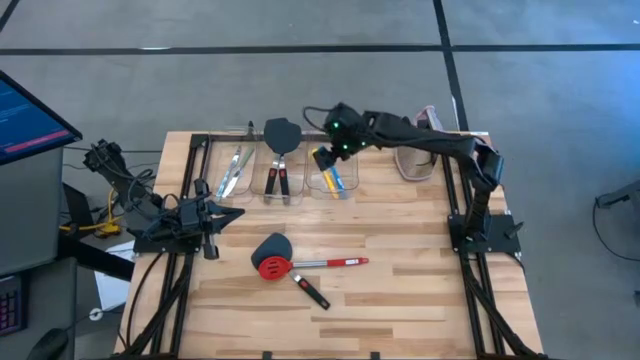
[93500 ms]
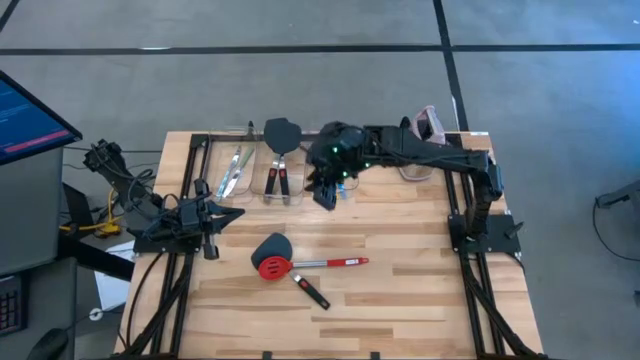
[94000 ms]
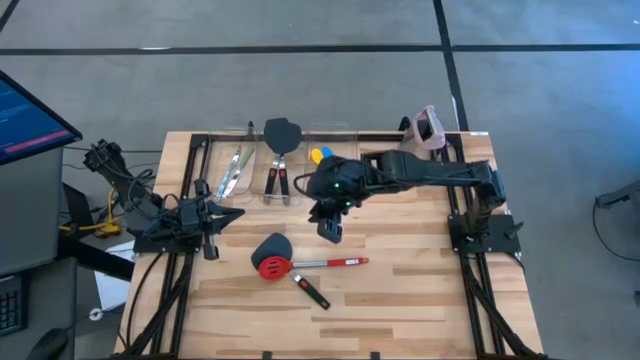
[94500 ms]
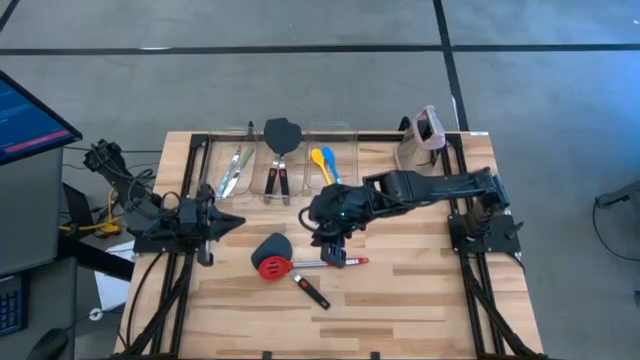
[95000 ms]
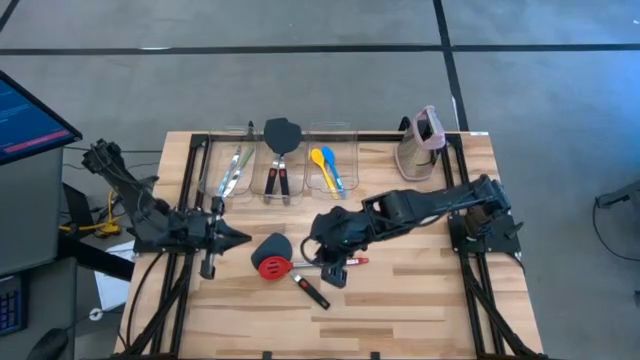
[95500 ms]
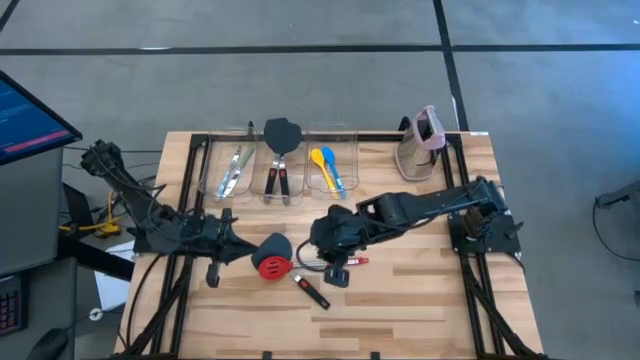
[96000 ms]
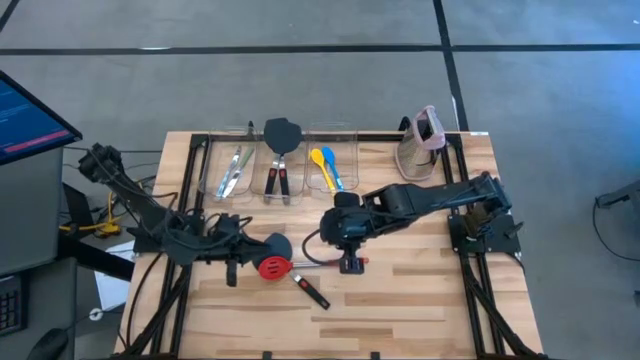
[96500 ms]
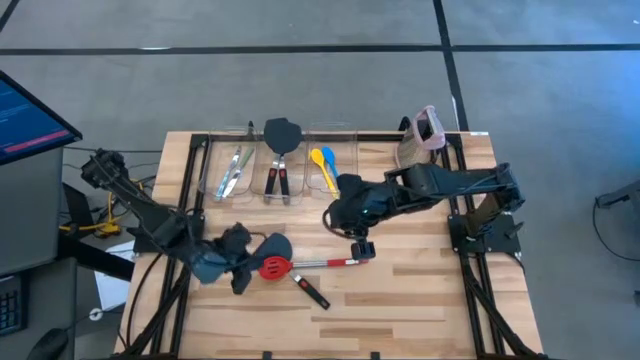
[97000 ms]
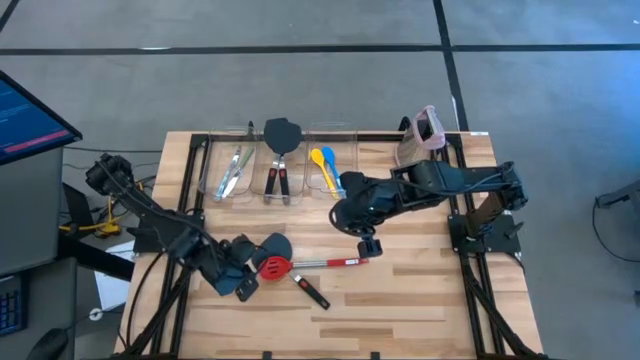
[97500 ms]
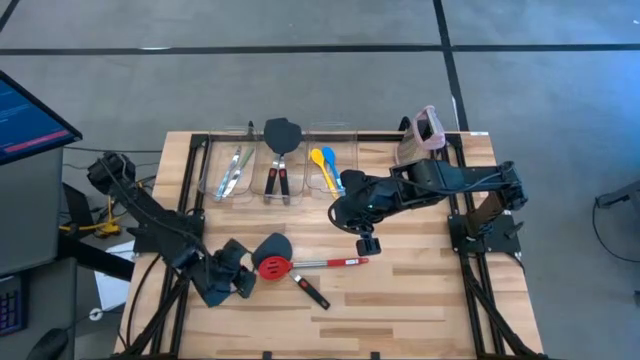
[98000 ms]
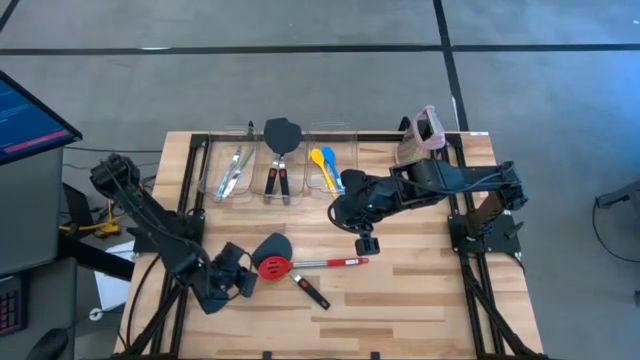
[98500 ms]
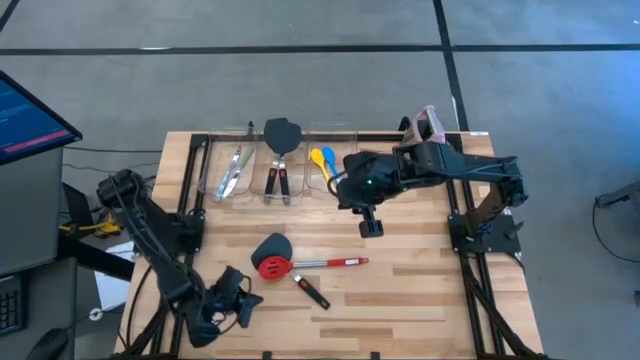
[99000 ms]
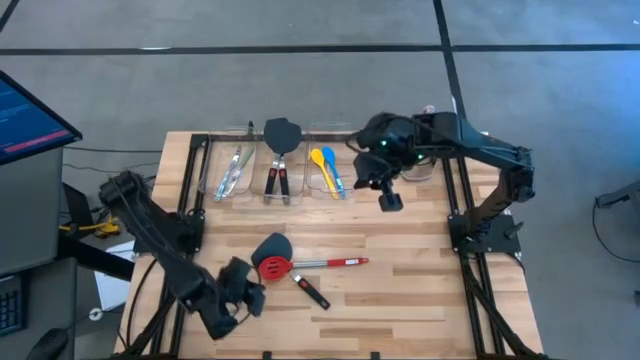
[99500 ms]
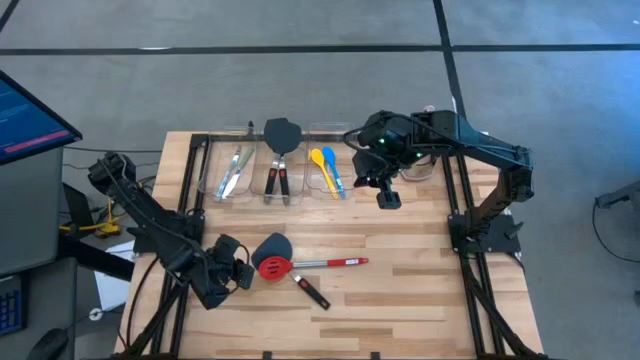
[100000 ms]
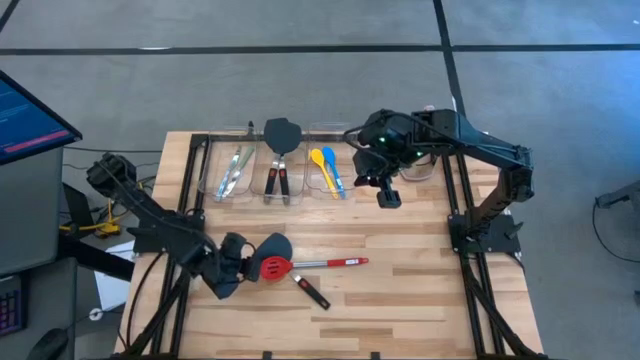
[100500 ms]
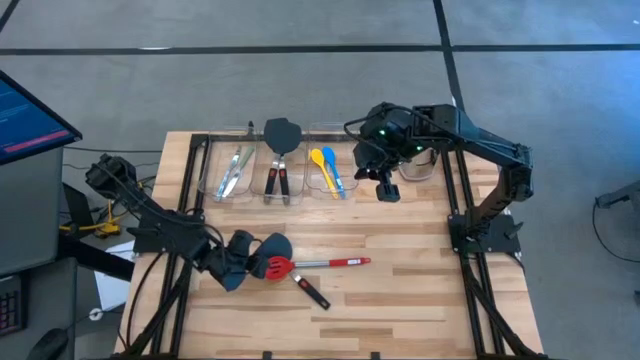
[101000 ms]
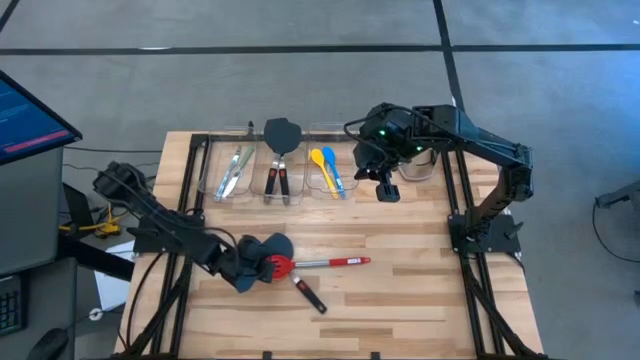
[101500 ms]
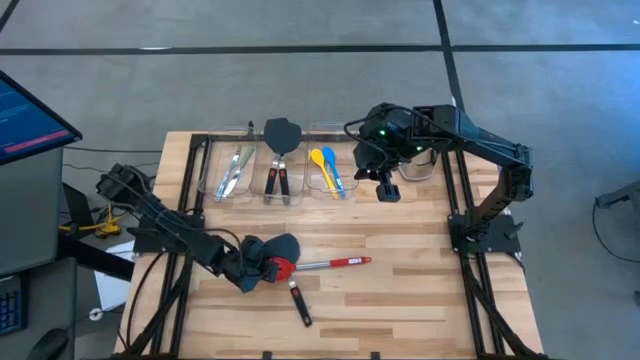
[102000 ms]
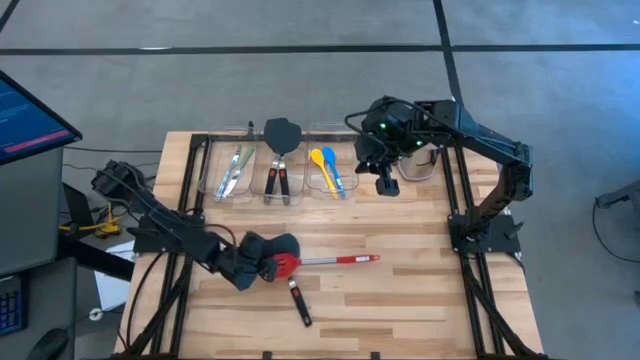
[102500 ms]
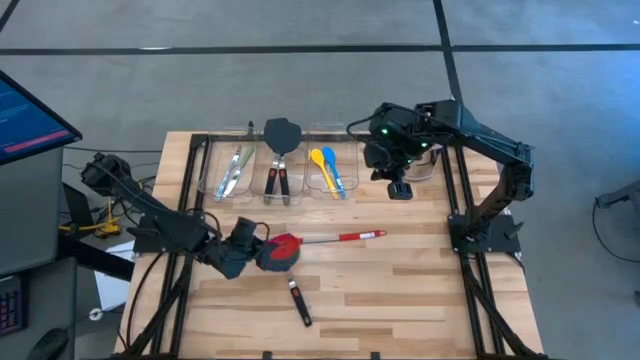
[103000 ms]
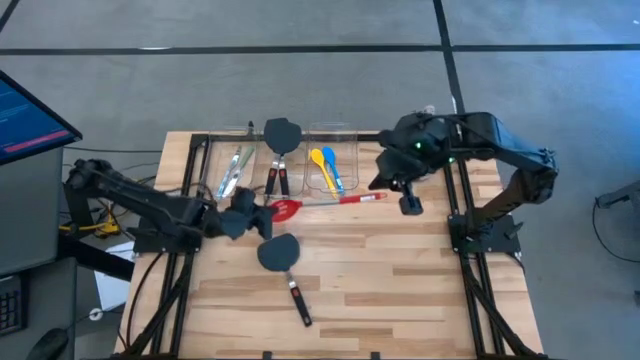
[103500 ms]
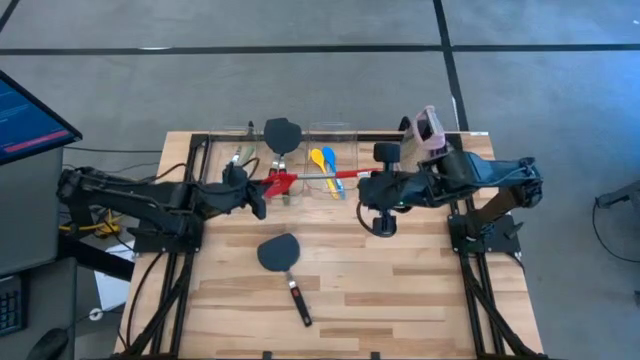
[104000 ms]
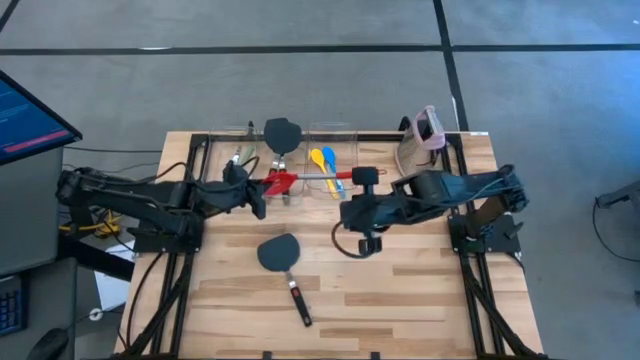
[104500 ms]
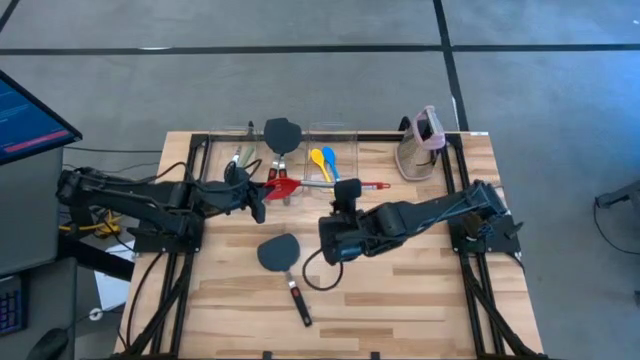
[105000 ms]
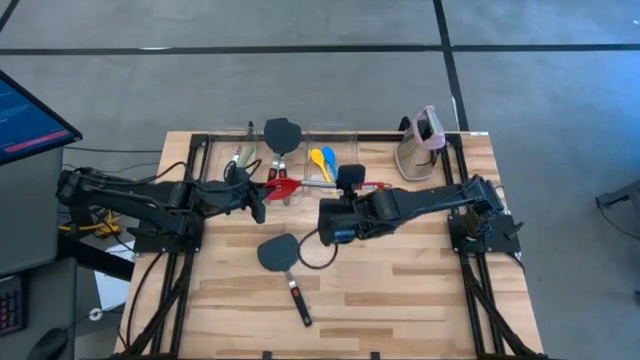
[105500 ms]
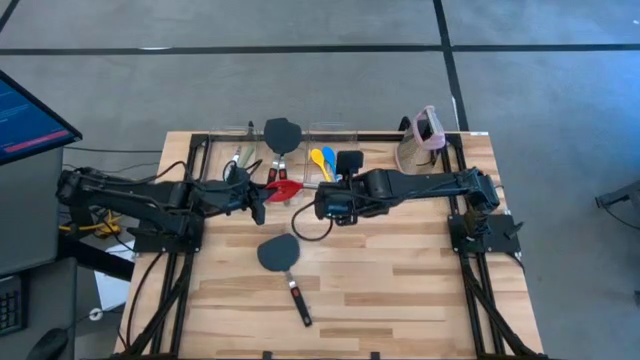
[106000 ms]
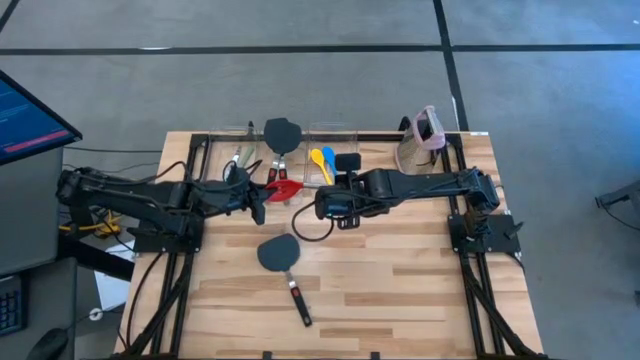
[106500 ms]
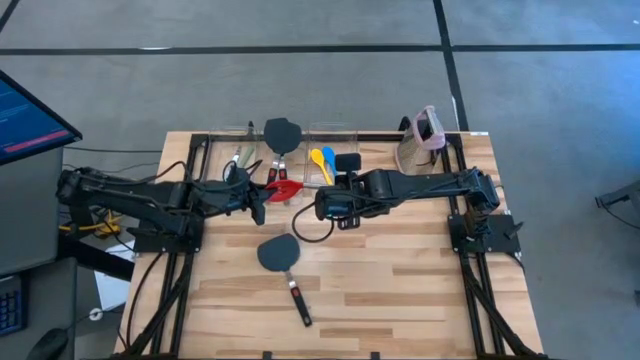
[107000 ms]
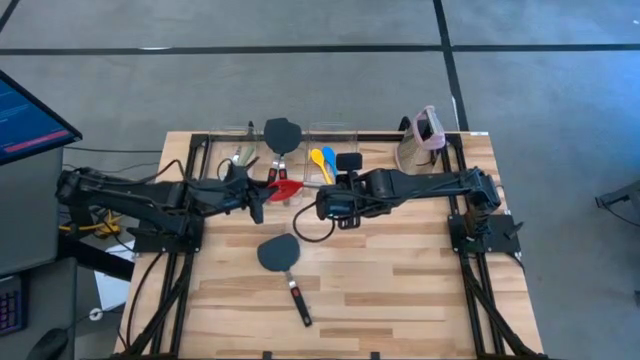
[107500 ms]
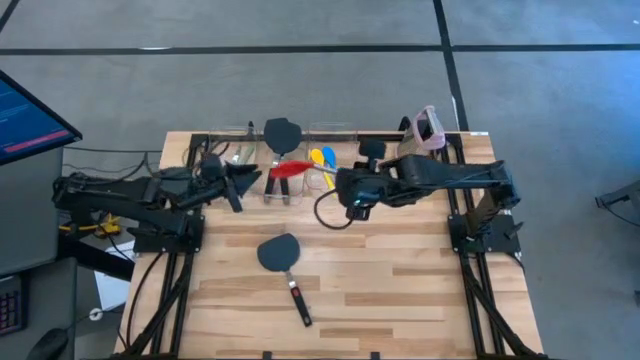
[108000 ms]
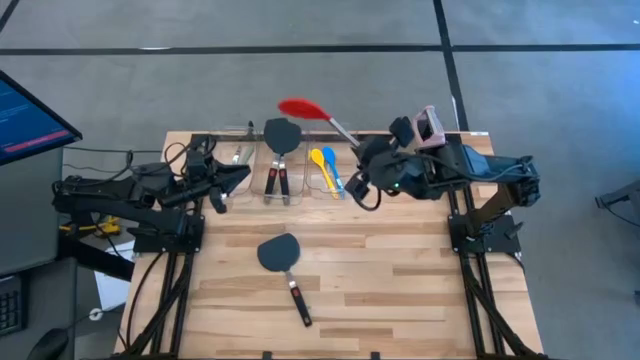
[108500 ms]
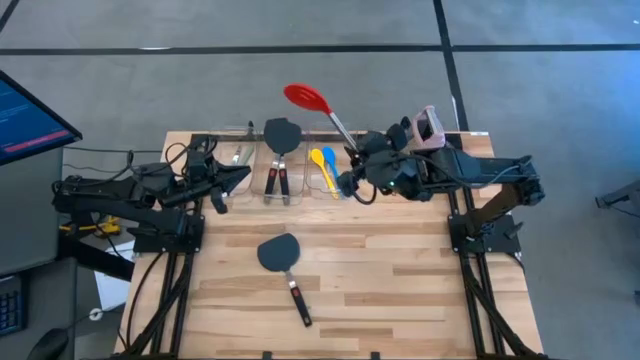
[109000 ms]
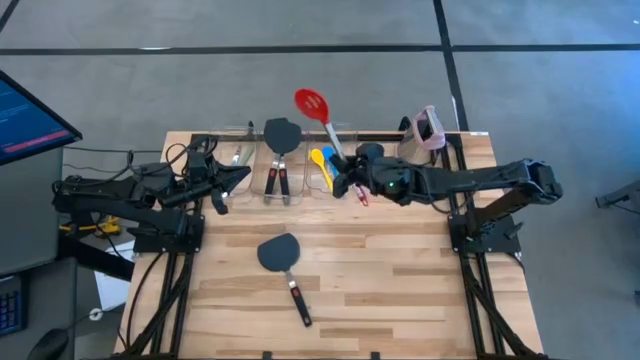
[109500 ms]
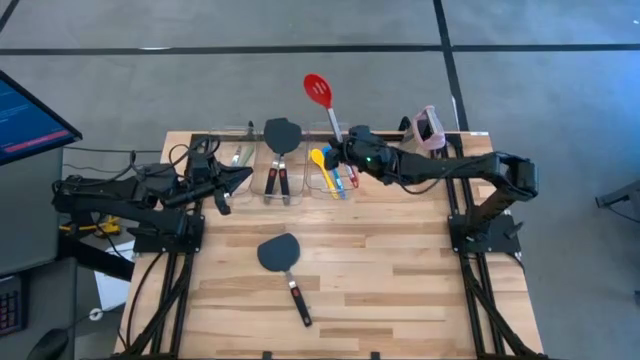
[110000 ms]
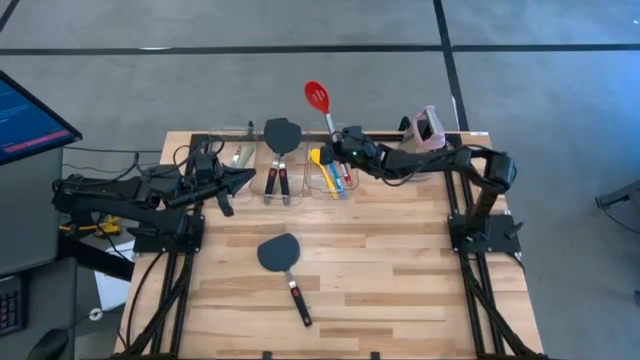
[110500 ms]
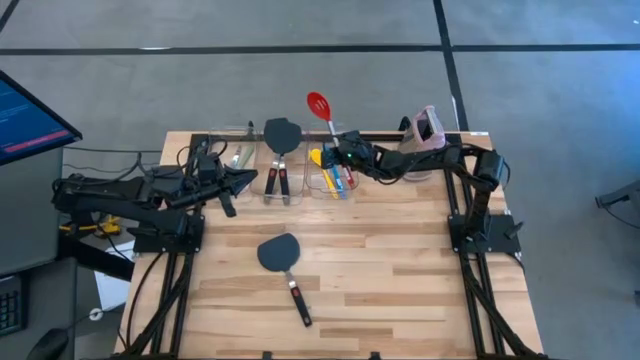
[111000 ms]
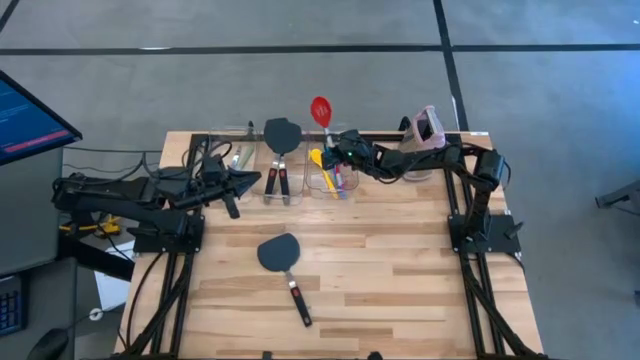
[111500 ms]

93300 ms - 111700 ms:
Task: Pick & Place Kitchen Items
Put the red slotted spoon into the right transparent bin

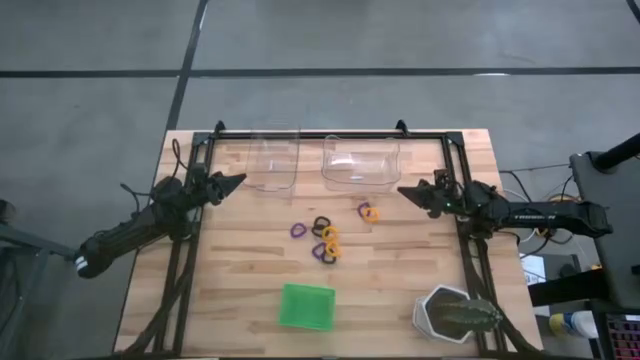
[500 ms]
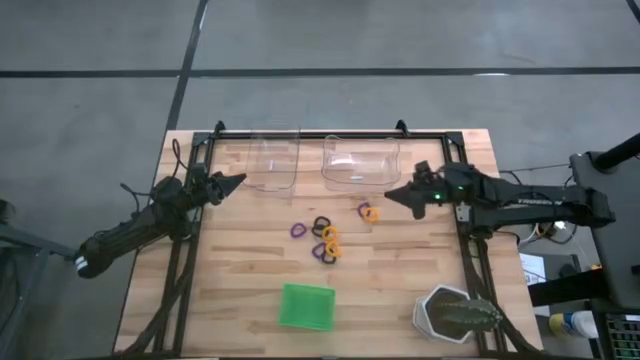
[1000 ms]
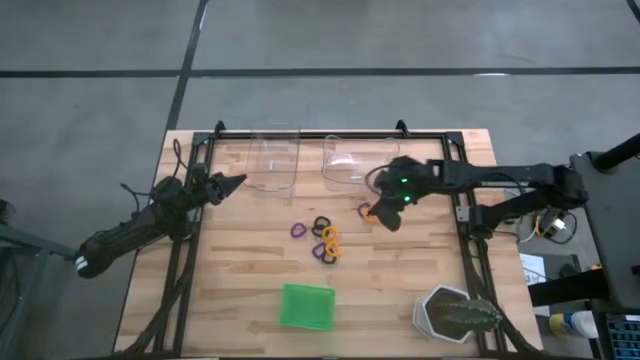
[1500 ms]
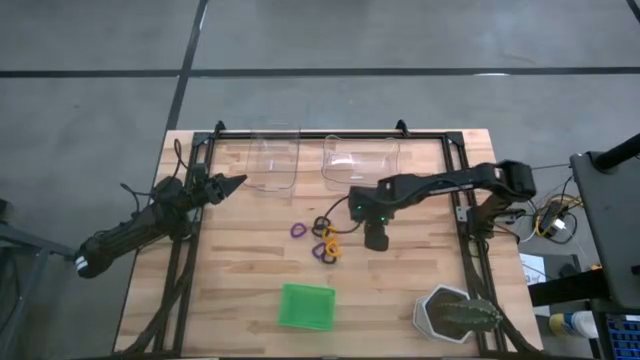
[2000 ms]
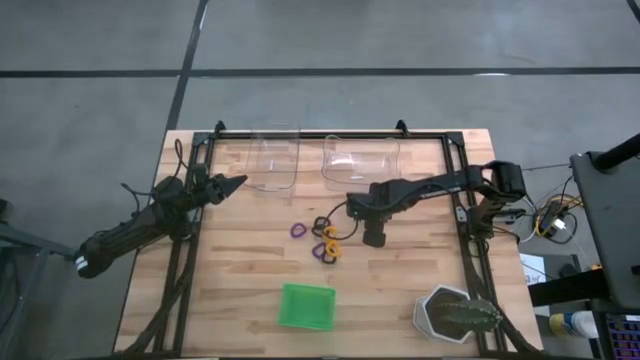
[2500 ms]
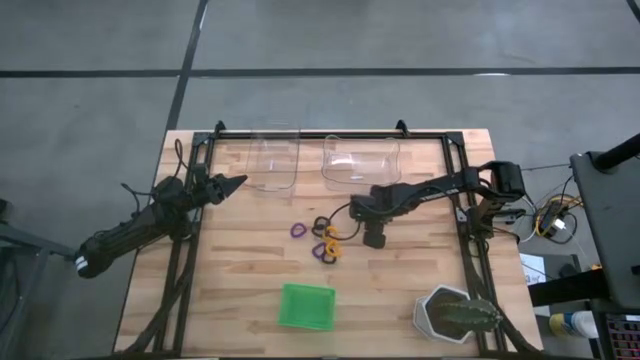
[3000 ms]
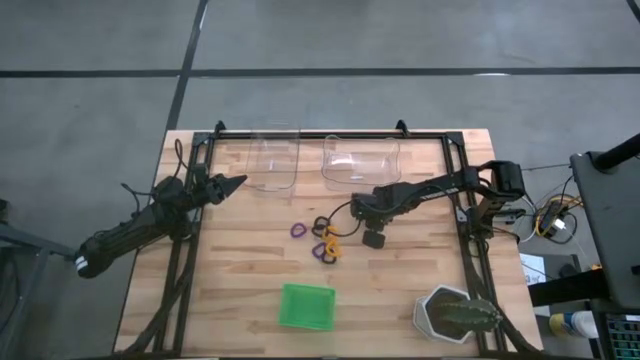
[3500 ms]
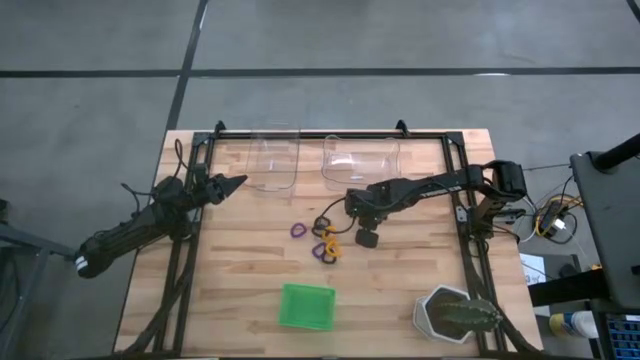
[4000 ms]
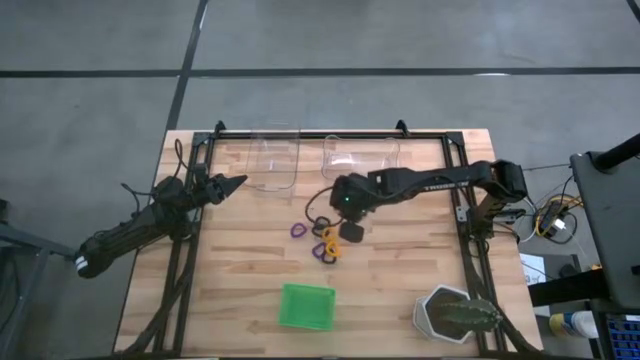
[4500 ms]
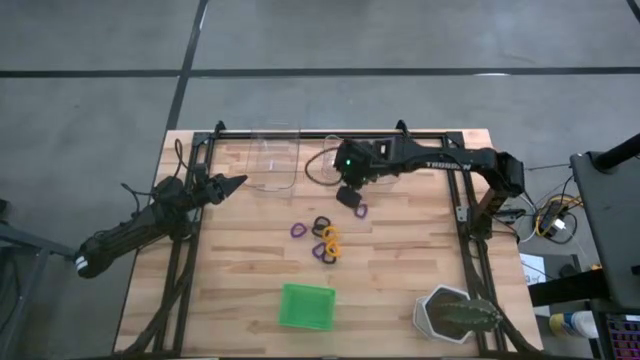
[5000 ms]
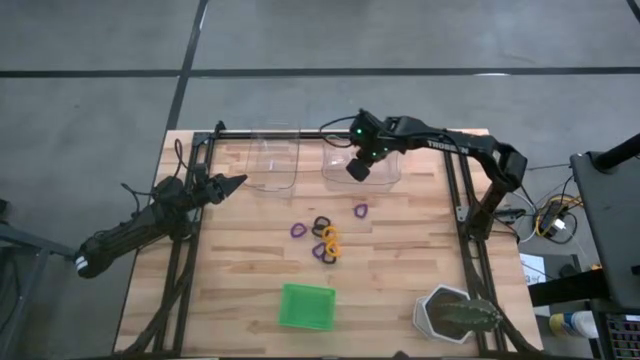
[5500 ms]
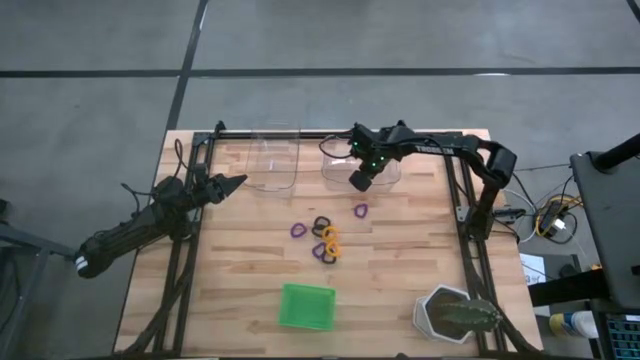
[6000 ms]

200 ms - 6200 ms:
Task: Sort spring keychains
Put the top yellow spring keychain into the right transparent bin
